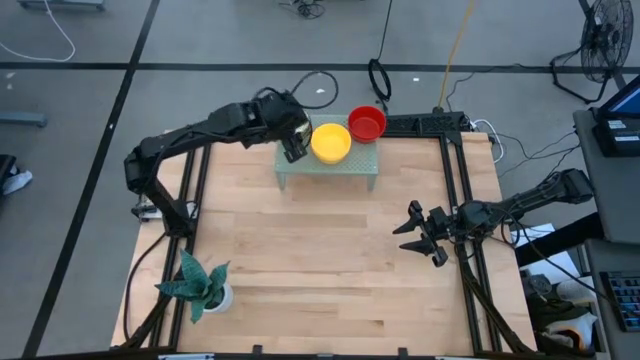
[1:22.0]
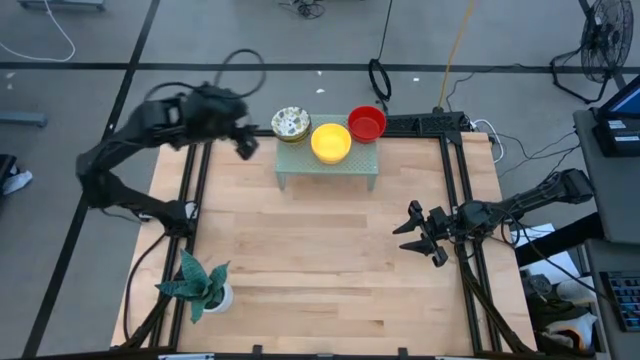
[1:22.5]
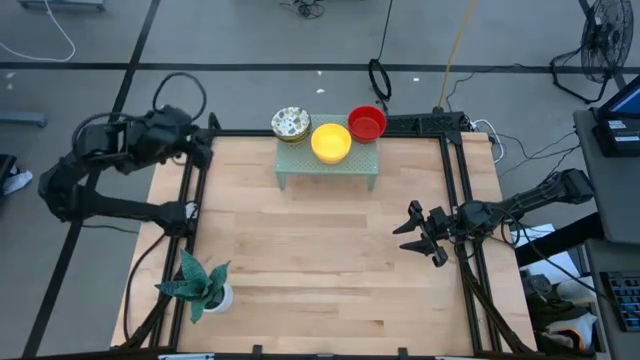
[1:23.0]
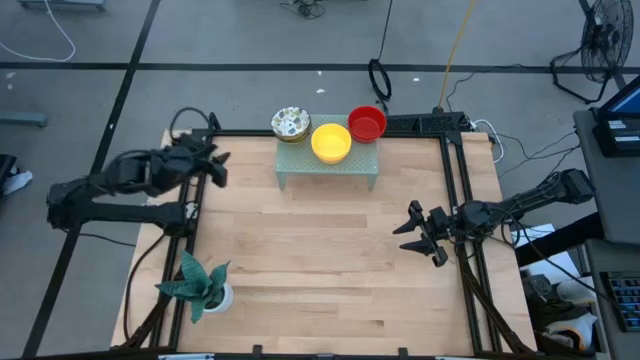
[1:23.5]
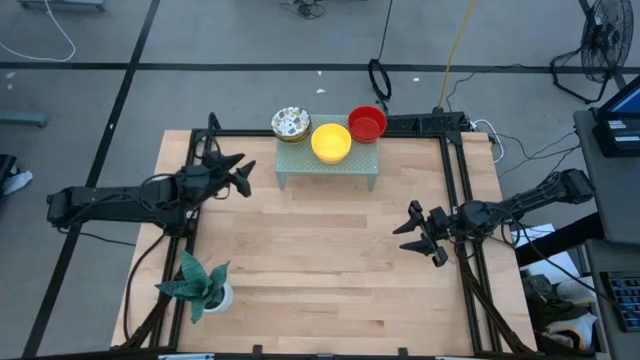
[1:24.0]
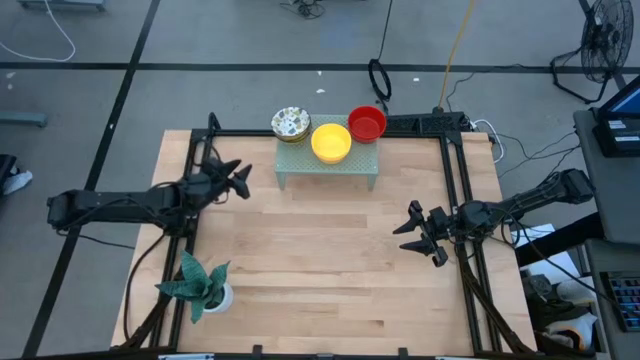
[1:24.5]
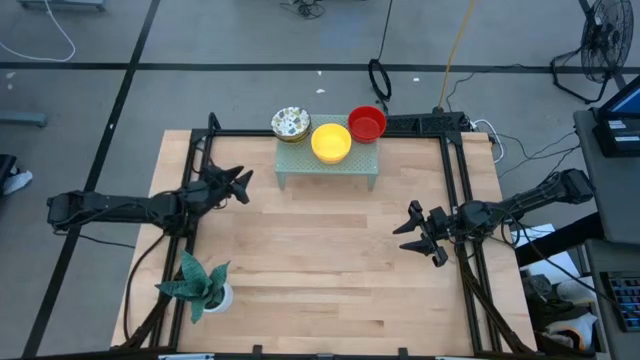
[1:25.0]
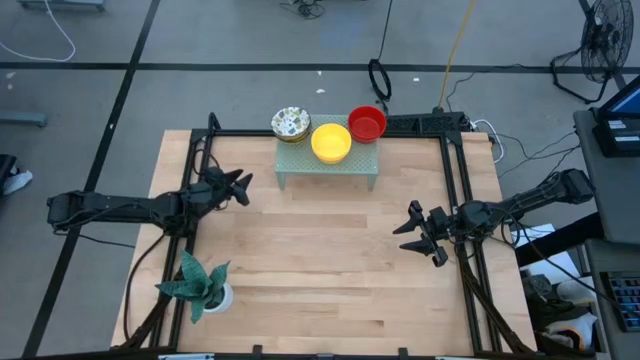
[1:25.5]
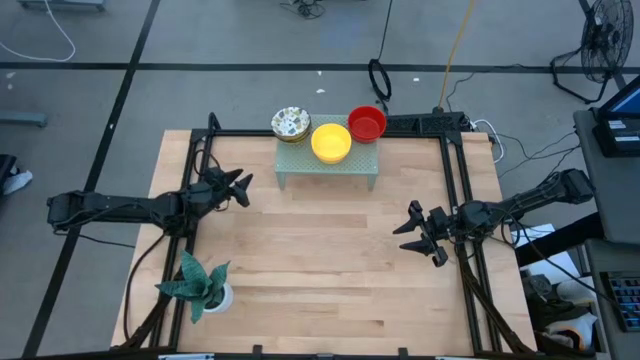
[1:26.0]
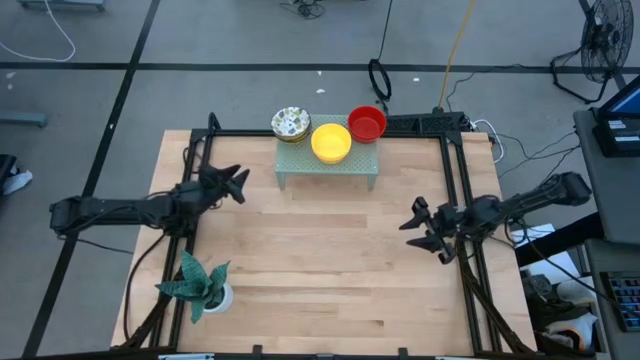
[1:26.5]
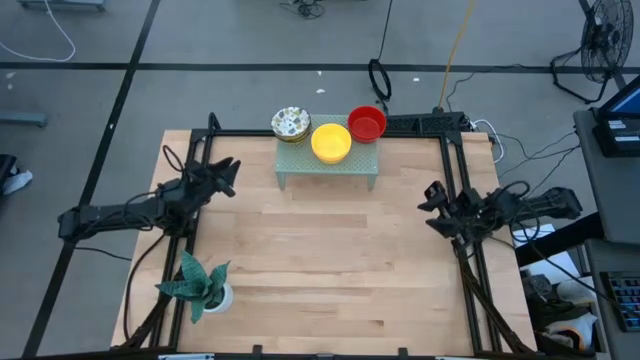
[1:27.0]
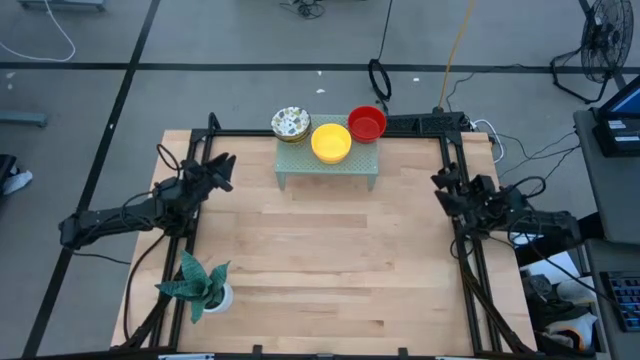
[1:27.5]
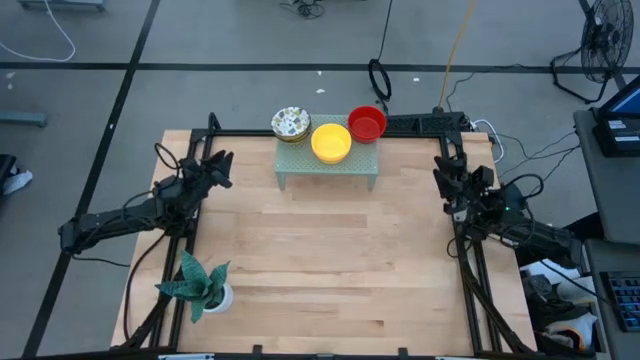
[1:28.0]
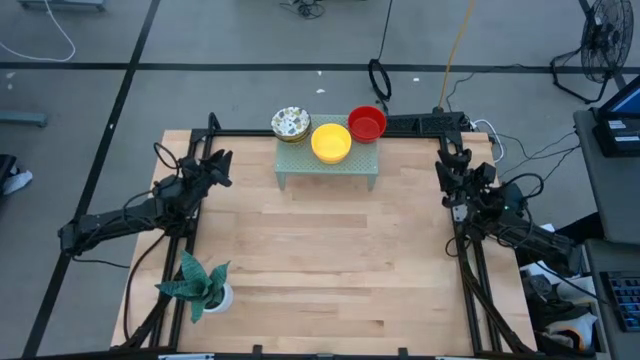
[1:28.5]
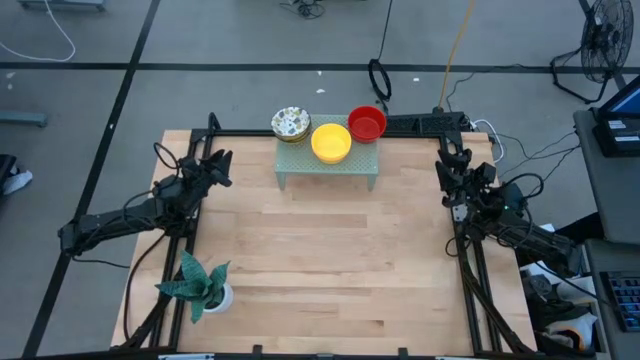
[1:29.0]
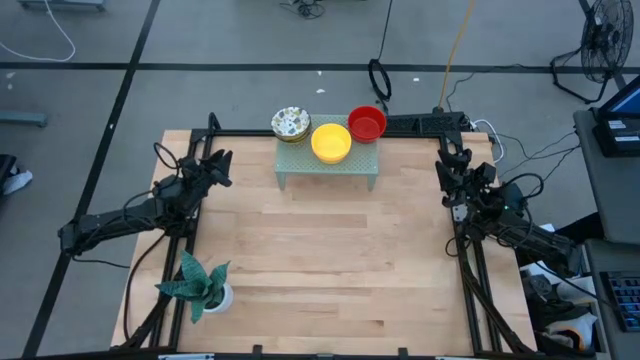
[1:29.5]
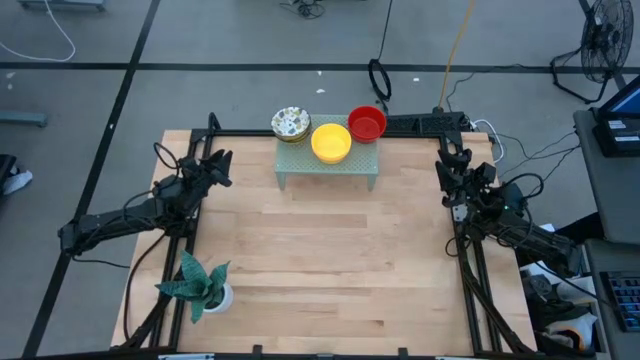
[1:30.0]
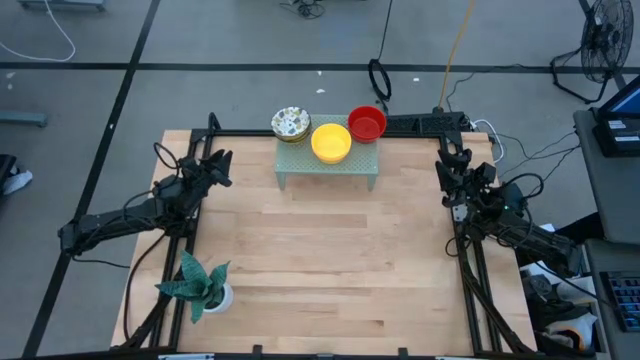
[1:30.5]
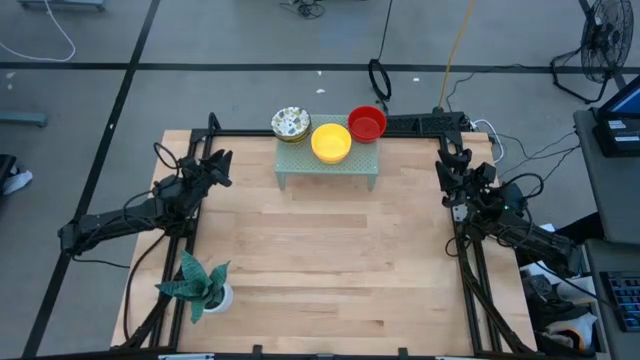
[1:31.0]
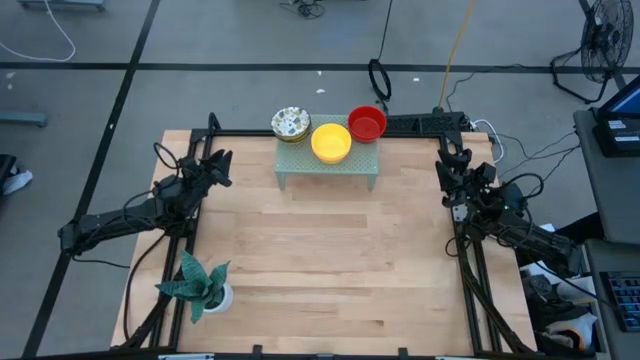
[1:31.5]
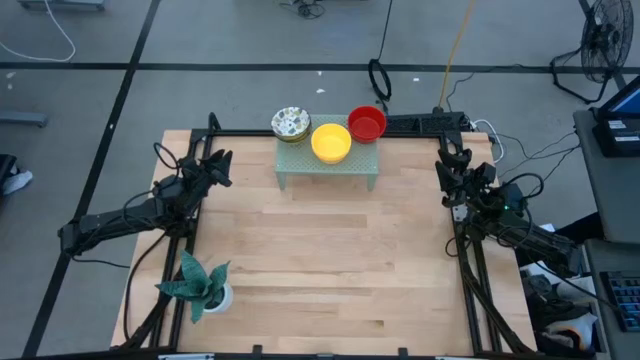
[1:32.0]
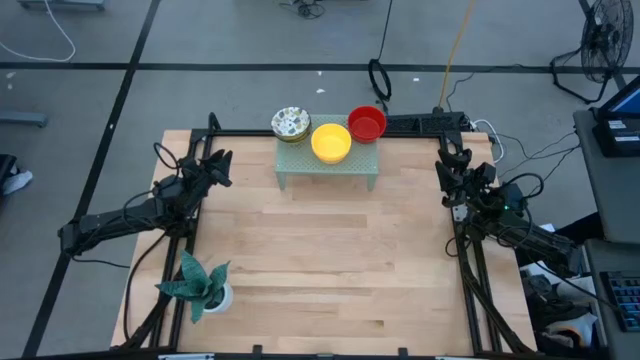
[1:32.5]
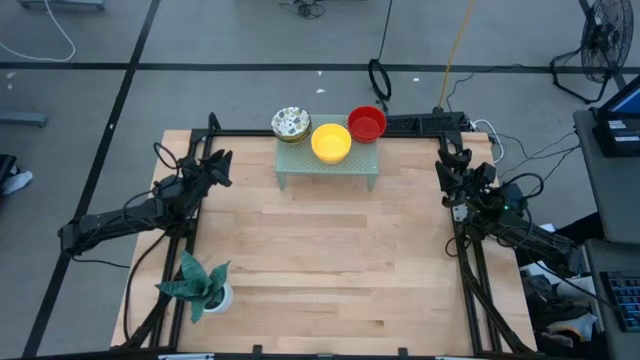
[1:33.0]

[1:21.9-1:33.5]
Task: Pick & Place Mini bowls
Return to Home Position

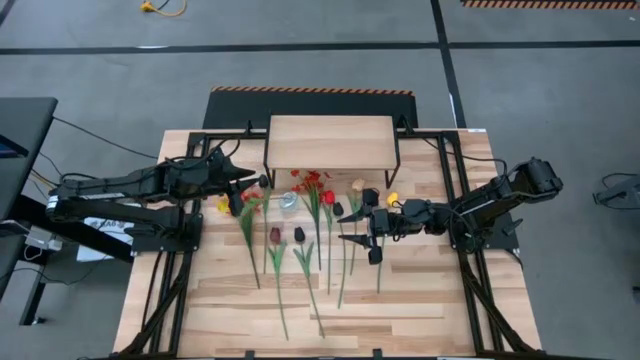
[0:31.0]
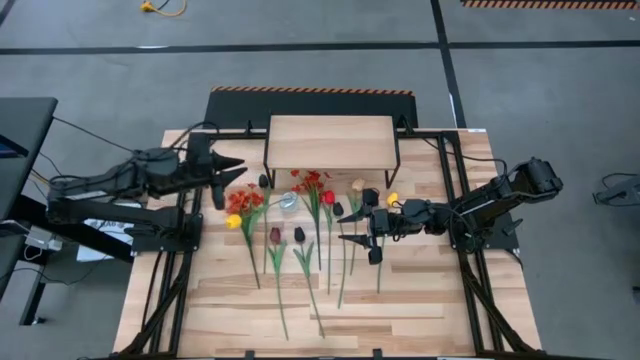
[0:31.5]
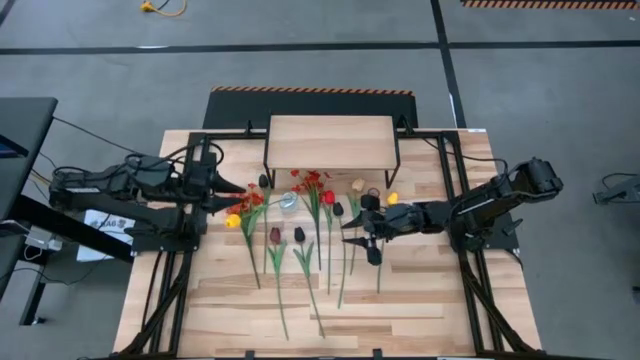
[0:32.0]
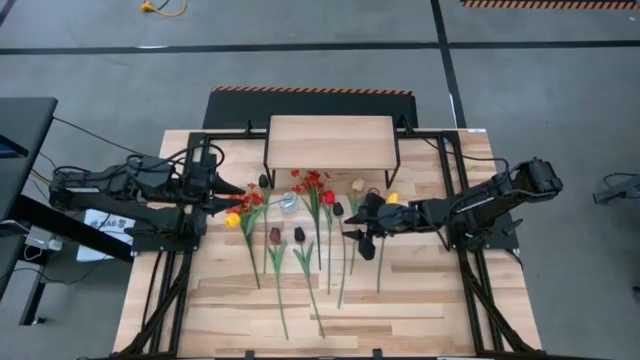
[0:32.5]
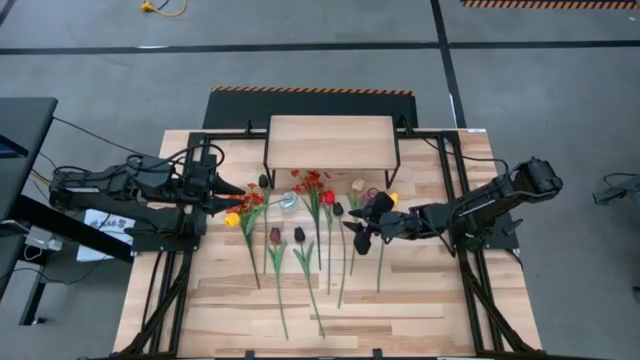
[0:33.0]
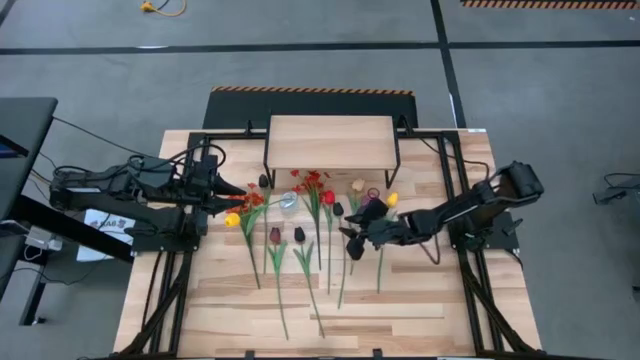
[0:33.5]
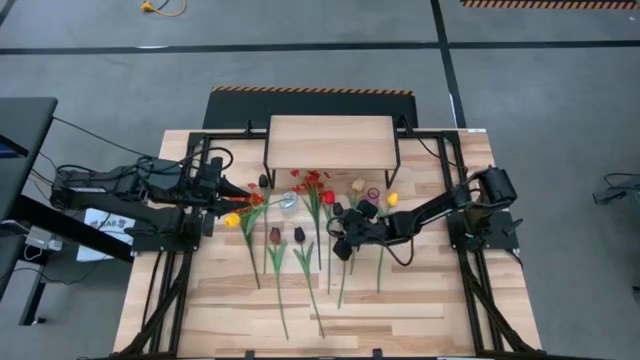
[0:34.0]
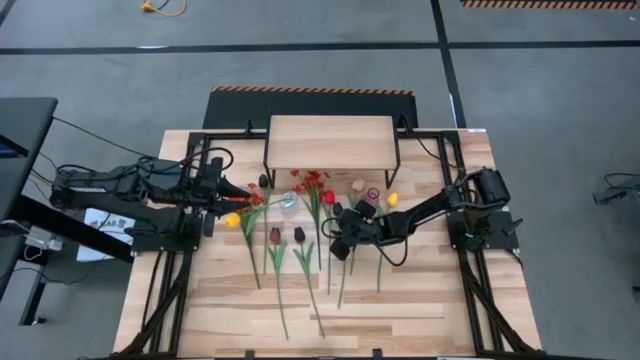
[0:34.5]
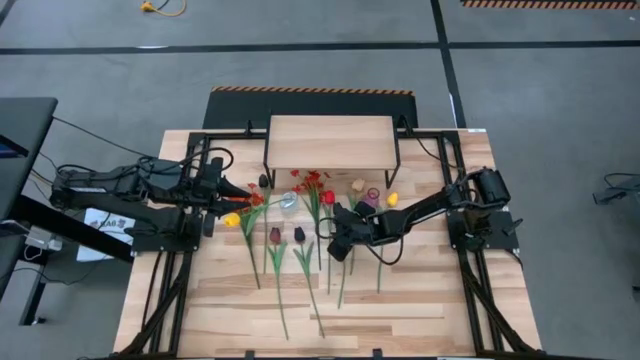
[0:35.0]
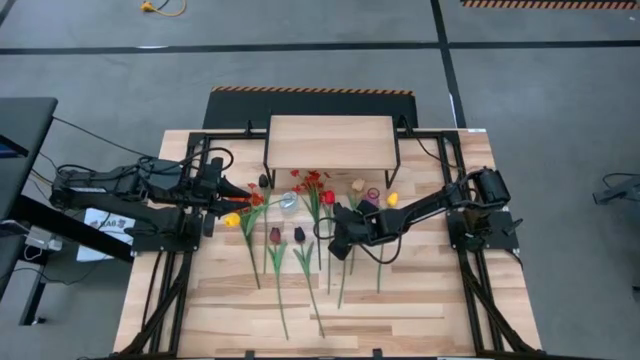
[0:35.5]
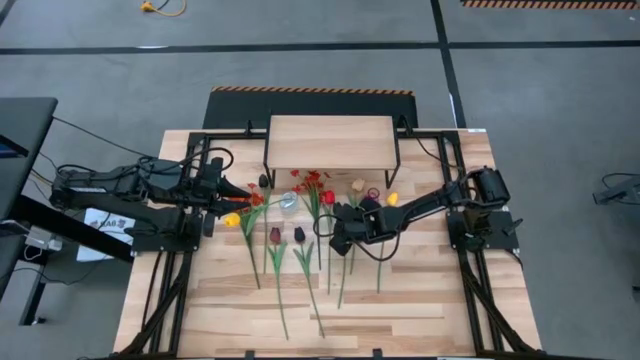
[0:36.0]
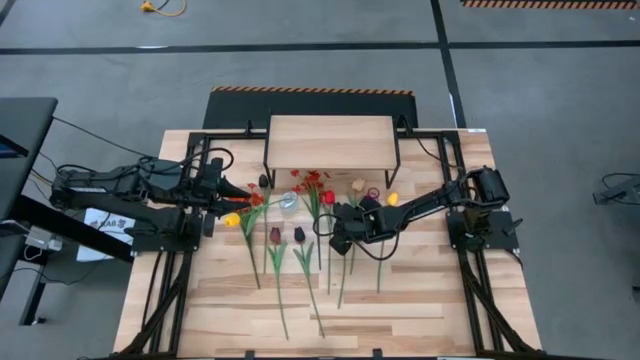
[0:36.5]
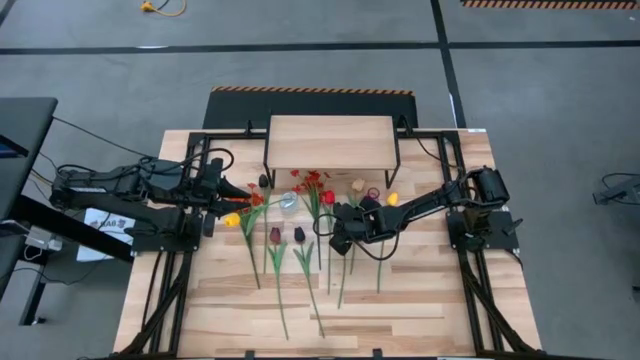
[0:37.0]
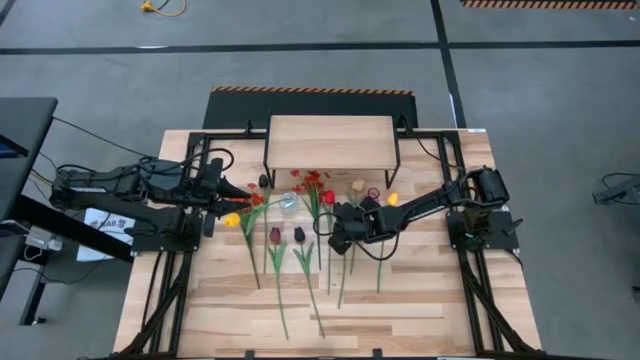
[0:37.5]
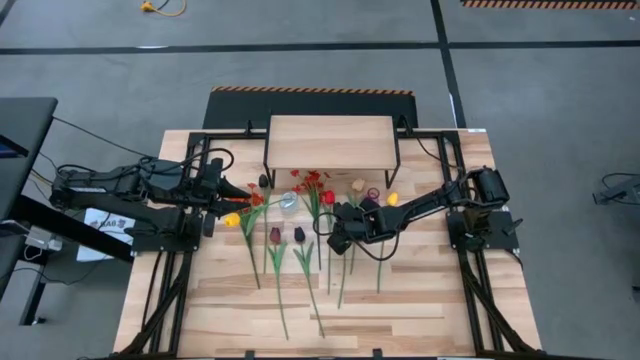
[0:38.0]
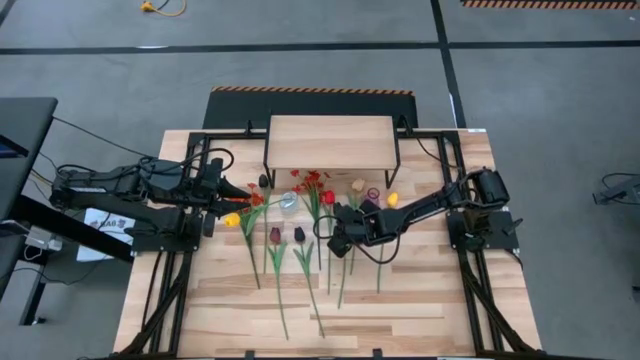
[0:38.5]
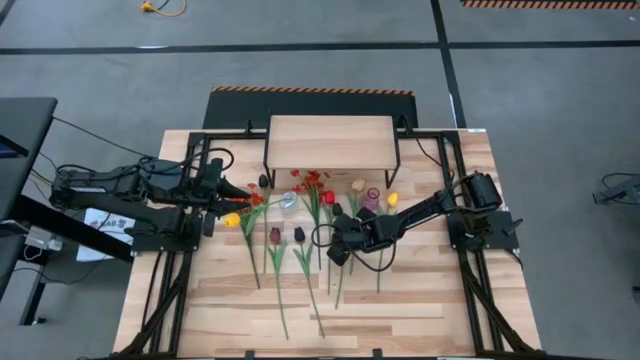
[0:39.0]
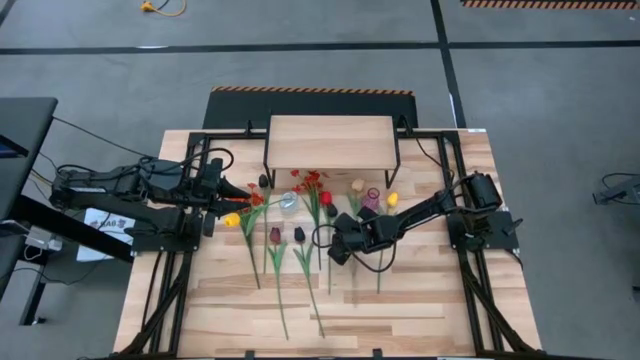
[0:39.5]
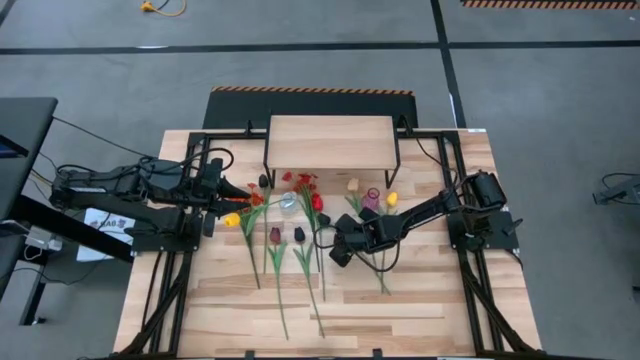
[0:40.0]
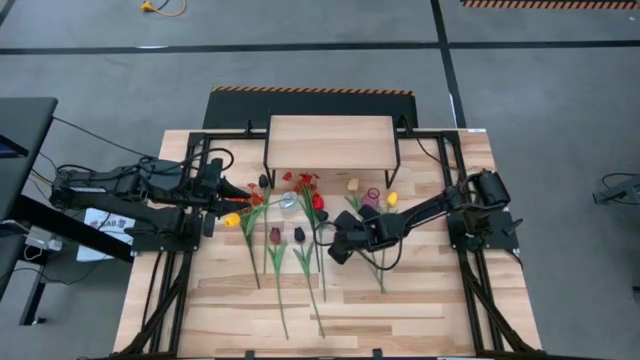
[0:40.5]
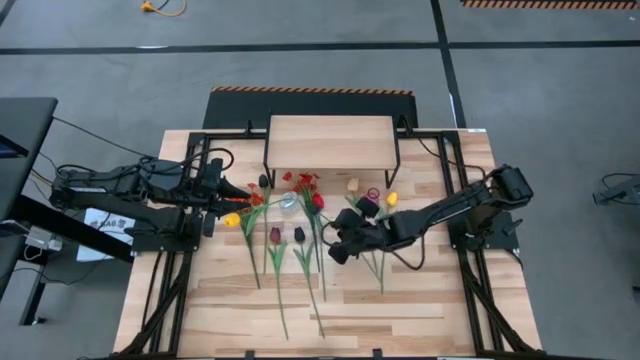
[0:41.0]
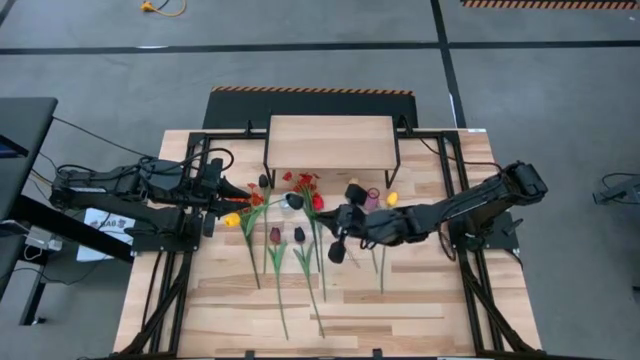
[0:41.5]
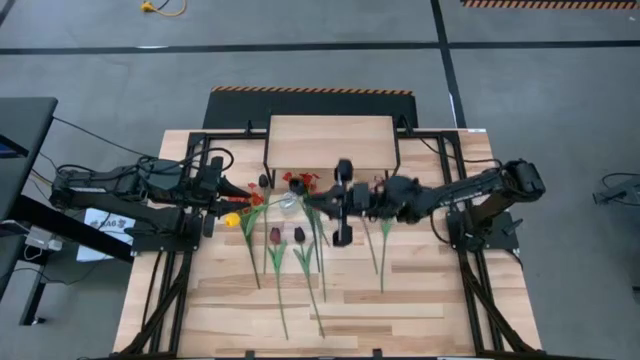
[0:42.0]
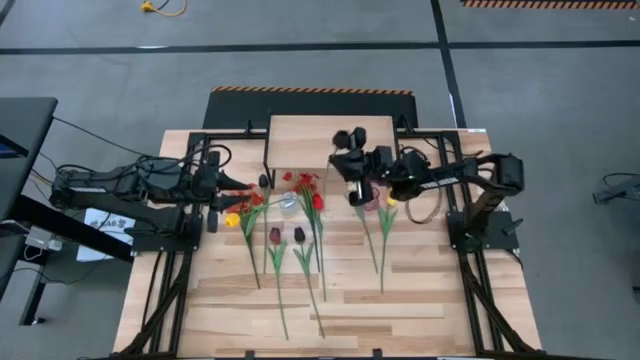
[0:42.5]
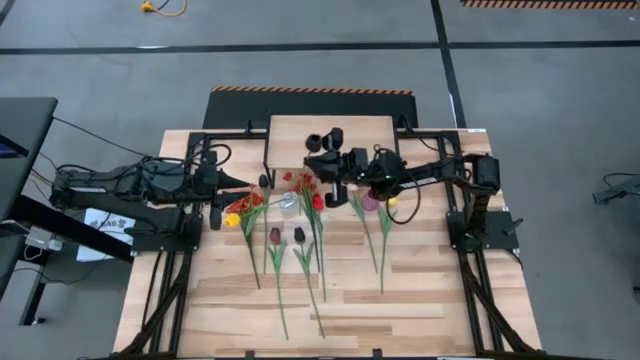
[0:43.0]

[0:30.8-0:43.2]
Task: Pick and place flowers into a vace then onto a shelf
Put the right black flower into the transparent vase
